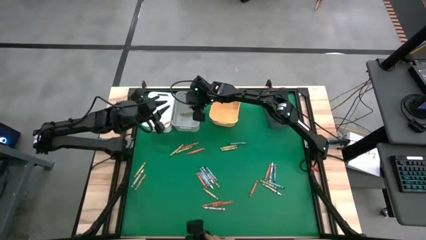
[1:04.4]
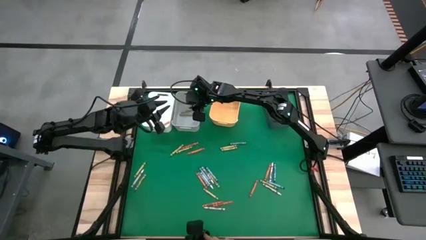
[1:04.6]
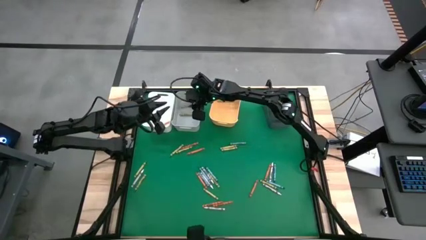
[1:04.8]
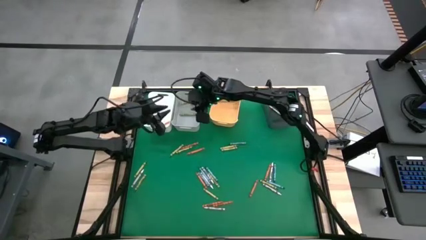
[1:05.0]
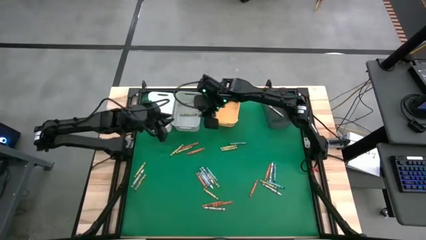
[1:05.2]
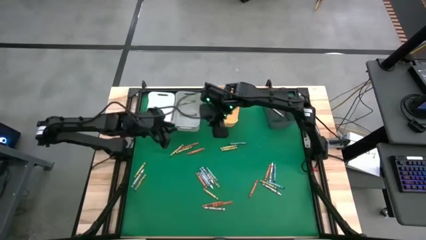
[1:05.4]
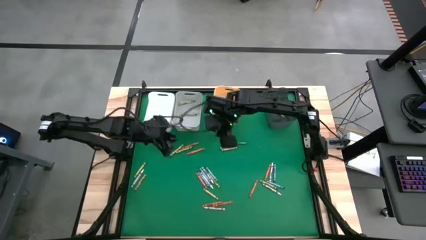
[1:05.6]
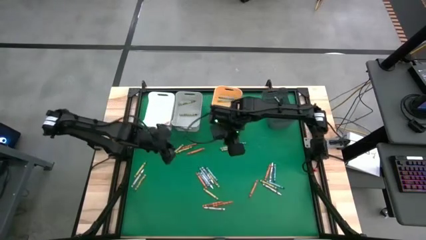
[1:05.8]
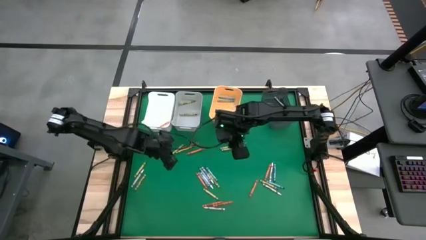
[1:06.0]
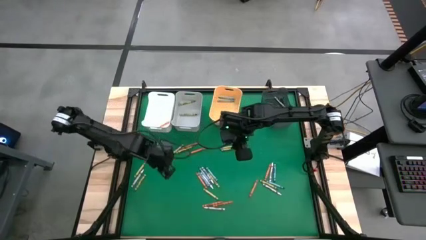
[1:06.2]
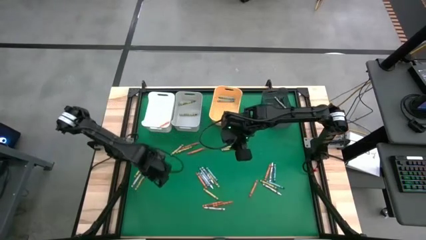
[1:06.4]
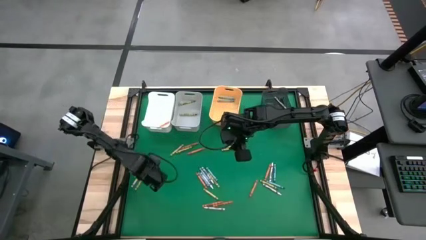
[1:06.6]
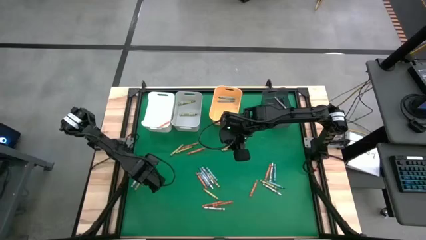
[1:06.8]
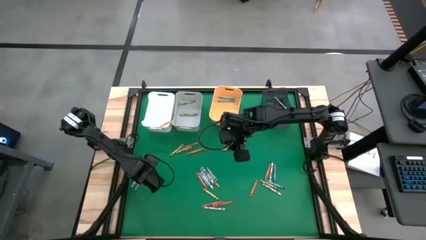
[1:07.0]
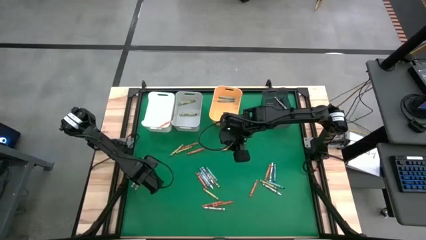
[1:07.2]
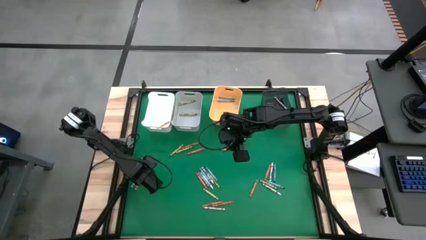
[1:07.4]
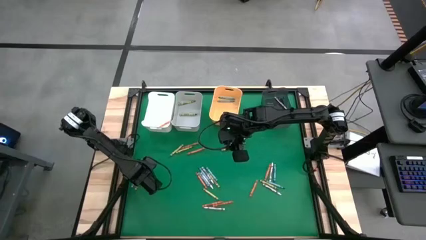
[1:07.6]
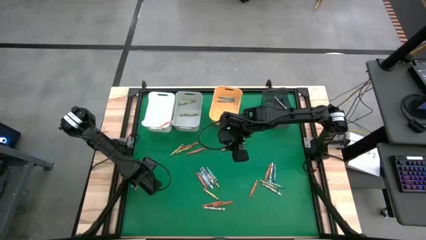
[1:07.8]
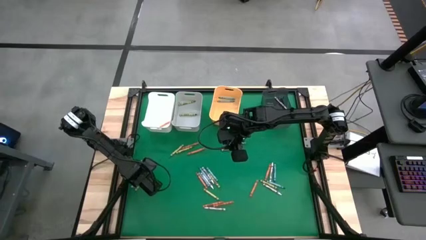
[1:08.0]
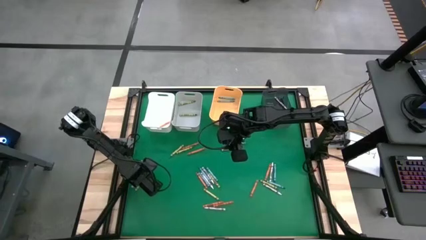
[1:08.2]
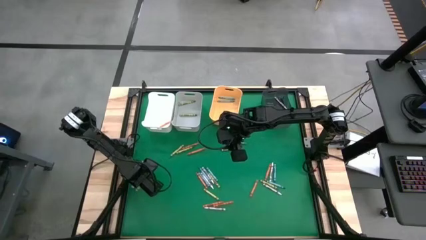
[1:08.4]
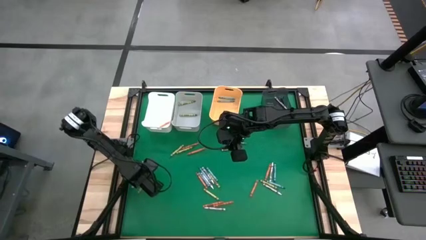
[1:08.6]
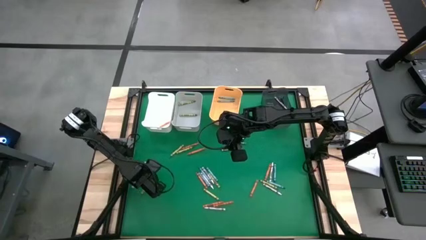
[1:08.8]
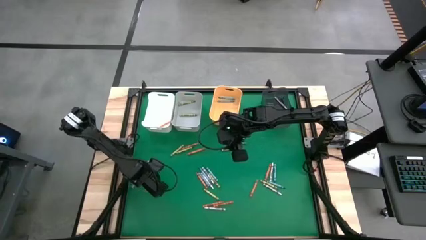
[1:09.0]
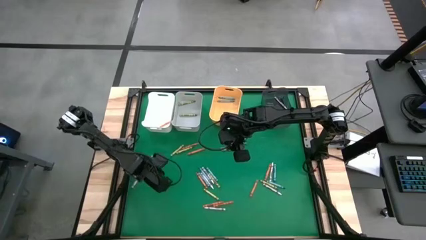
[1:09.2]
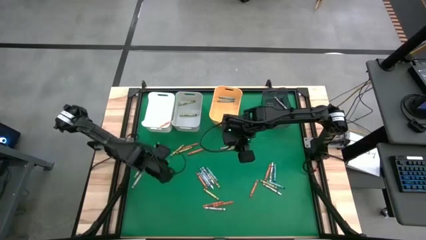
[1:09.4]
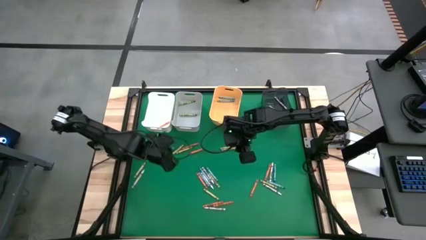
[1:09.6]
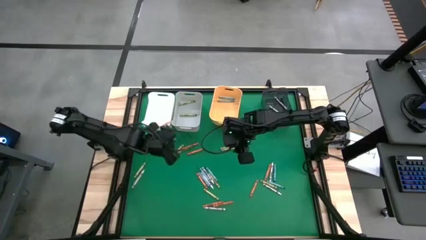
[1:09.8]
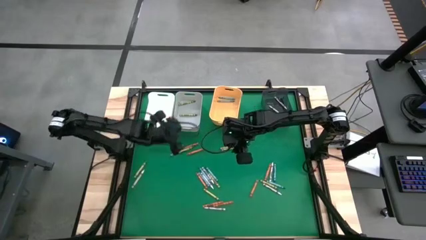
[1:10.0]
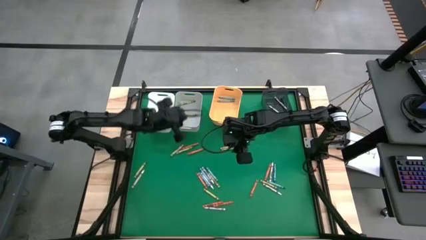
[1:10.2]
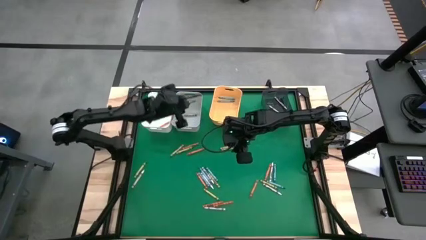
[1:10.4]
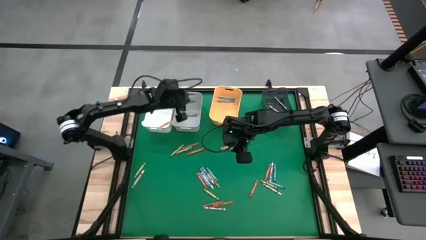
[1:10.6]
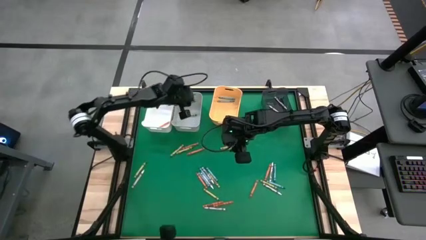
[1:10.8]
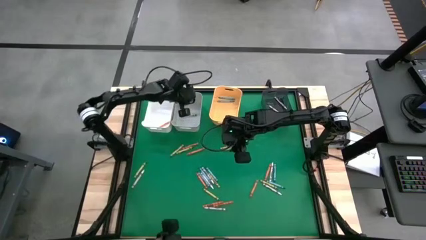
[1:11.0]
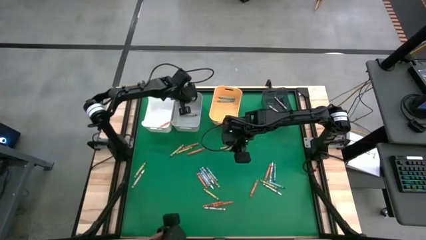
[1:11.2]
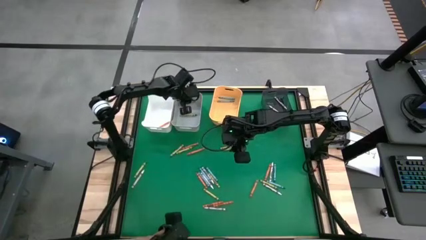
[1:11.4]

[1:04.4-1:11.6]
Task: Sort crayons
Put the green crayon into the gray bin

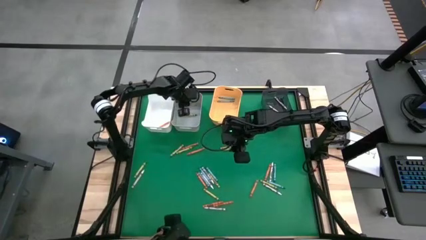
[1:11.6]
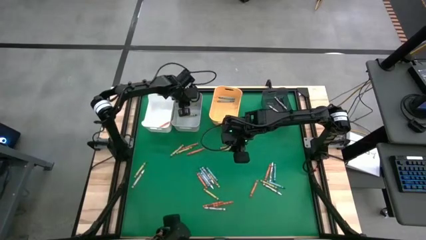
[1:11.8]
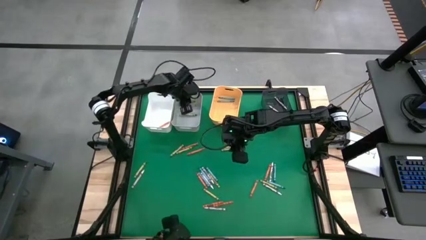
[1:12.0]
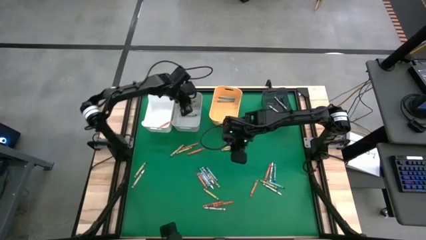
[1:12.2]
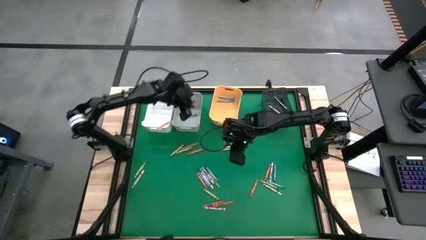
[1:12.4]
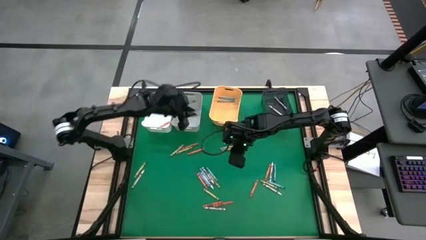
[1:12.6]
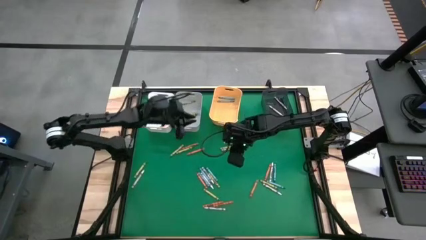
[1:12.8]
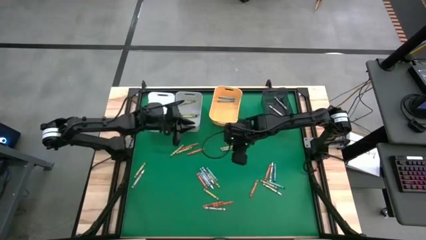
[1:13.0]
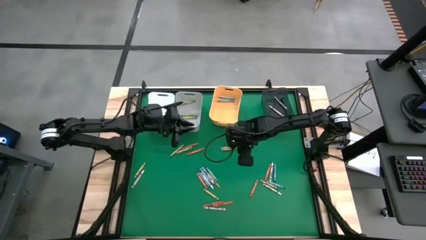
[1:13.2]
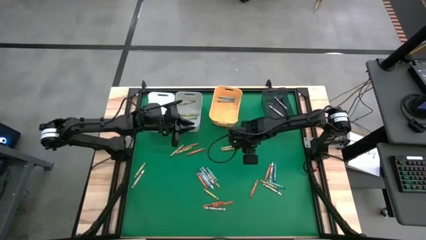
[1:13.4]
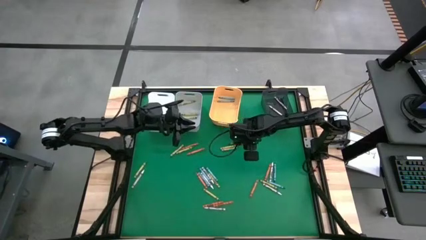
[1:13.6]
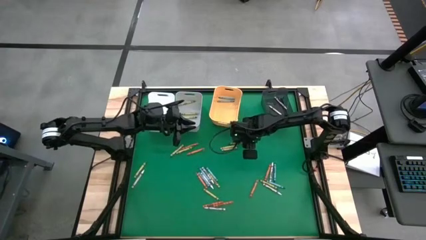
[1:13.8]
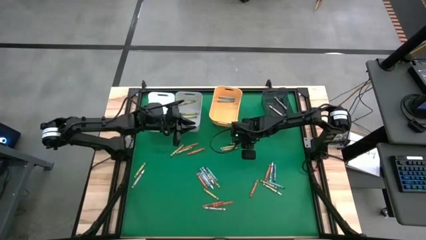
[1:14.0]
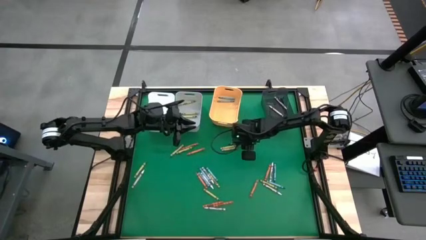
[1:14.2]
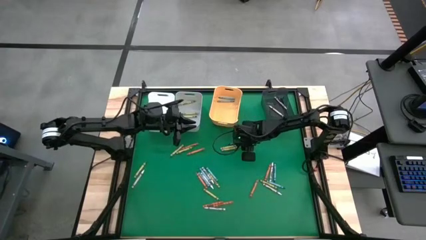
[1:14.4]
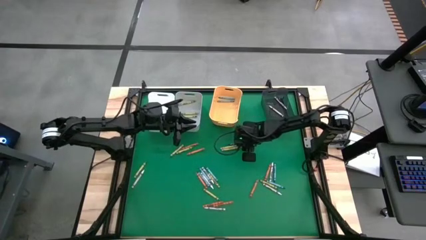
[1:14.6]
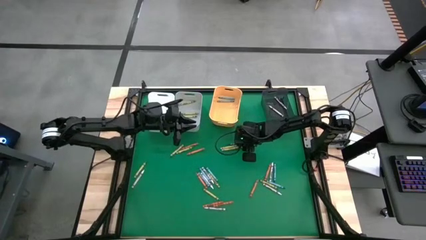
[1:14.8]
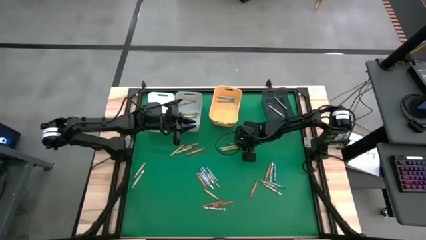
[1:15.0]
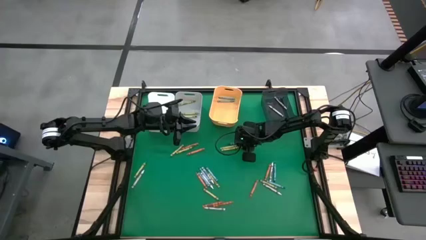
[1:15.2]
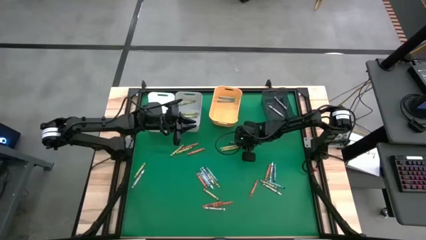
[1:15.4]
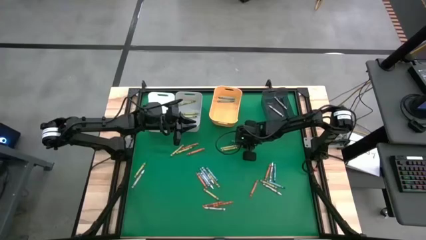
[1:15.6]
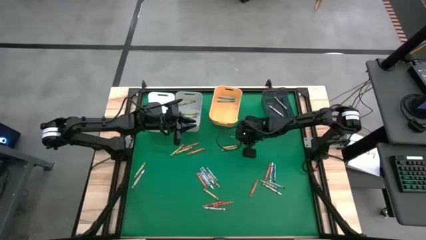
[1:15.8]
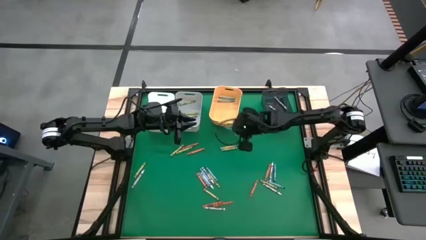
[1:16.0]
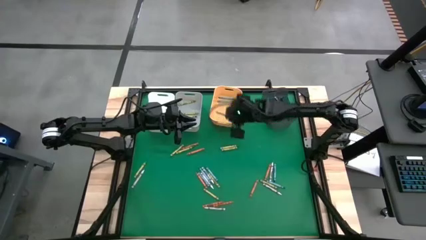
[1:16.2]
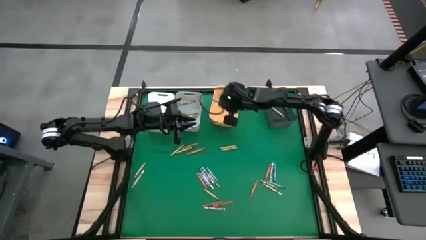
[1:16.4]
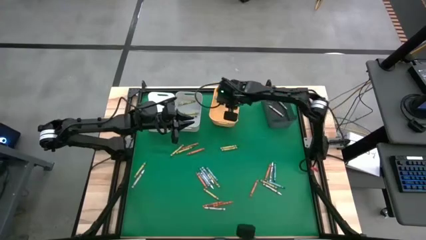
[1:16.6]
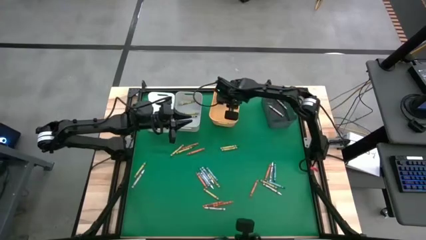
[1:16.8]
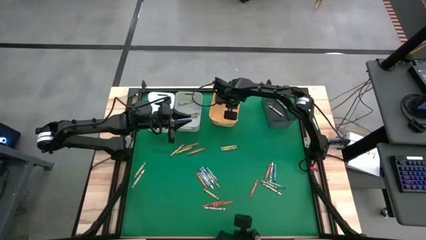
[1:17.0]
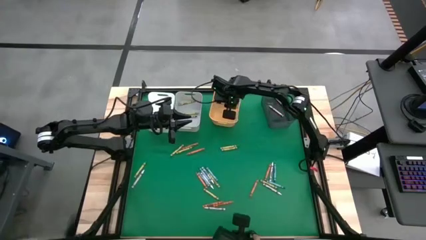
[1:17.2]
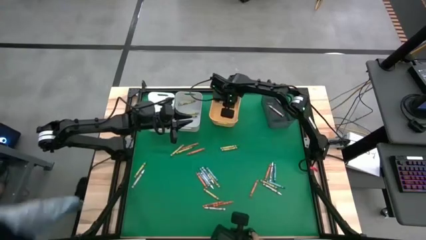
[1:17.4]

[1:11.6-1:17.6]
Put the blue crayon into the yellow bin

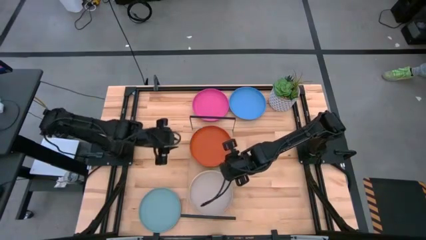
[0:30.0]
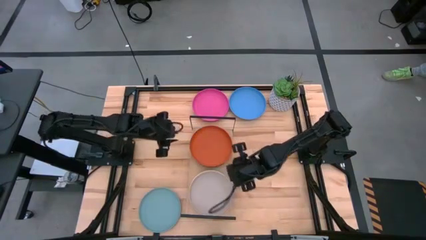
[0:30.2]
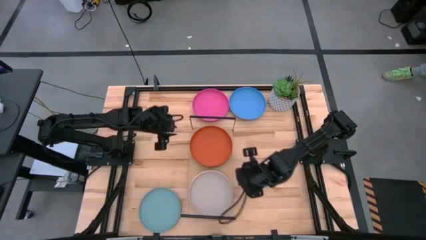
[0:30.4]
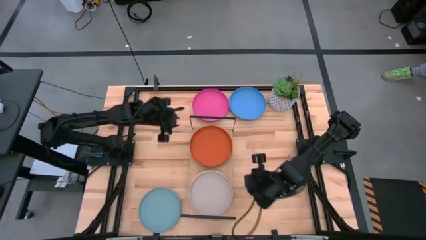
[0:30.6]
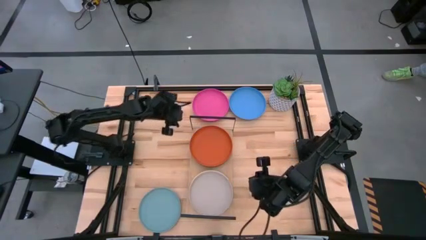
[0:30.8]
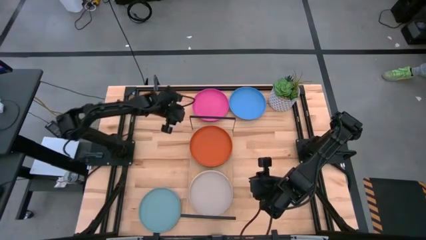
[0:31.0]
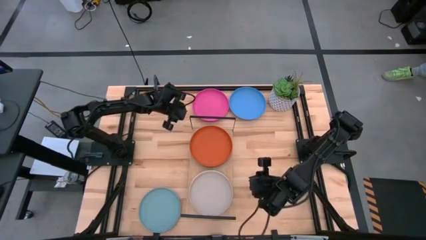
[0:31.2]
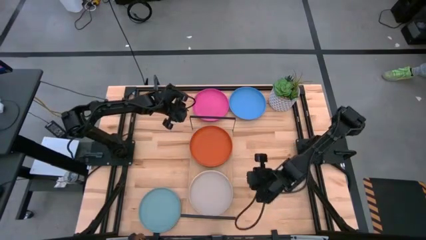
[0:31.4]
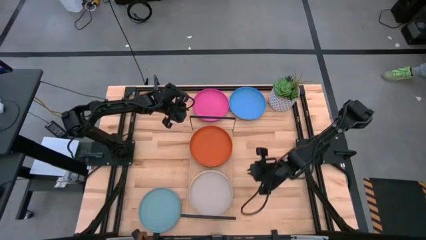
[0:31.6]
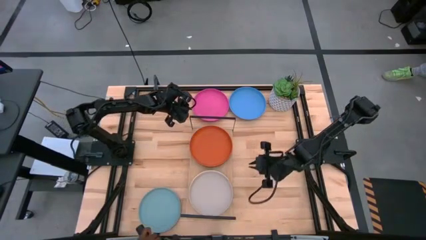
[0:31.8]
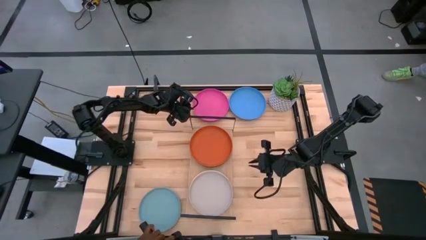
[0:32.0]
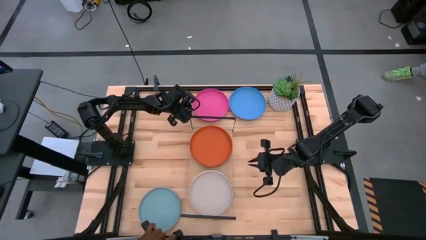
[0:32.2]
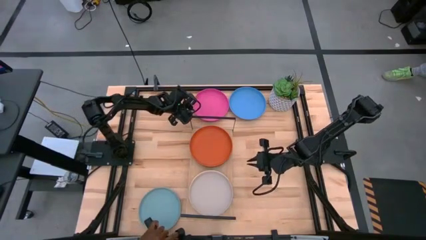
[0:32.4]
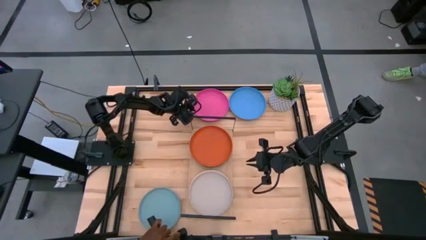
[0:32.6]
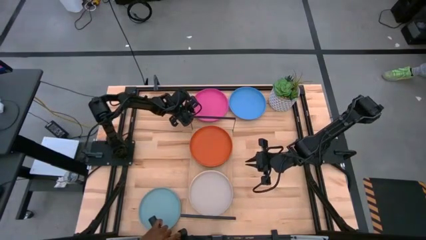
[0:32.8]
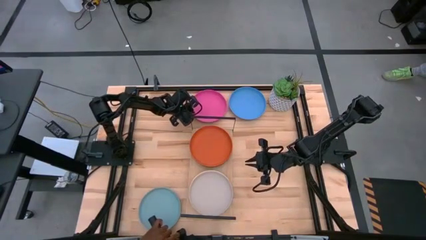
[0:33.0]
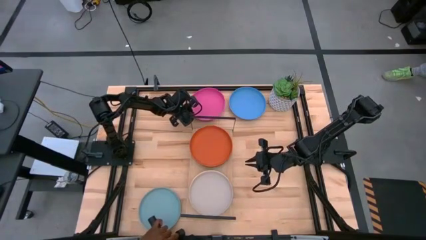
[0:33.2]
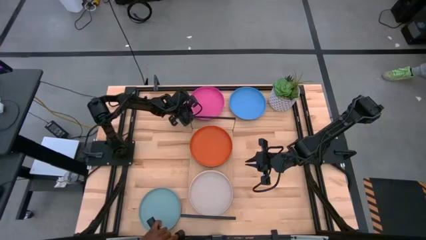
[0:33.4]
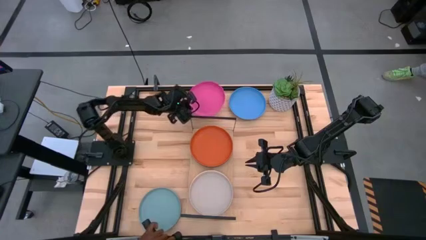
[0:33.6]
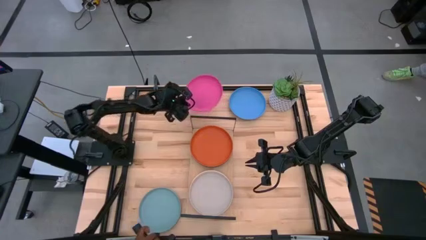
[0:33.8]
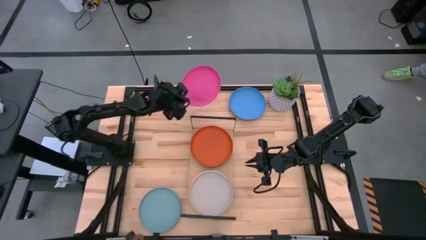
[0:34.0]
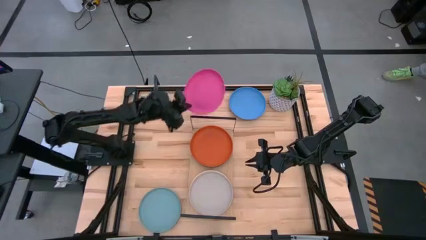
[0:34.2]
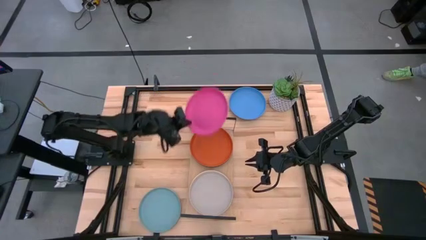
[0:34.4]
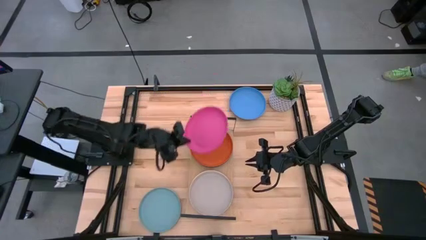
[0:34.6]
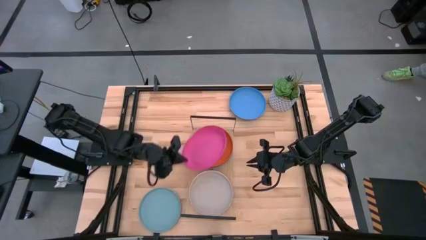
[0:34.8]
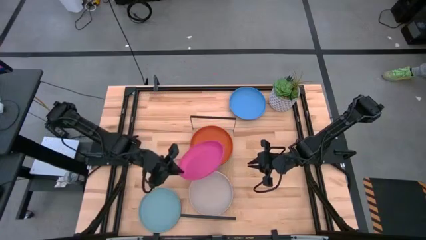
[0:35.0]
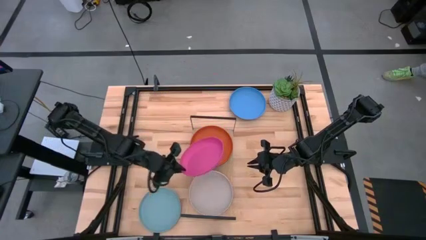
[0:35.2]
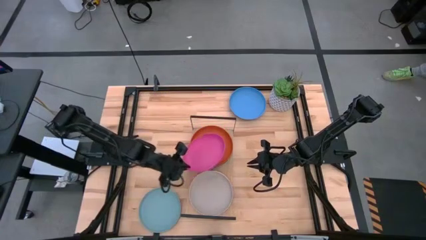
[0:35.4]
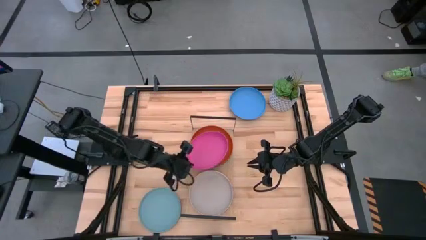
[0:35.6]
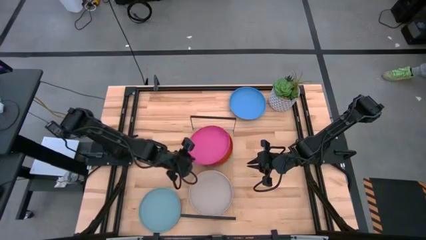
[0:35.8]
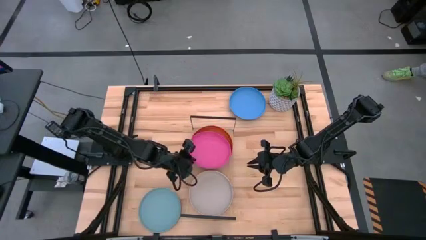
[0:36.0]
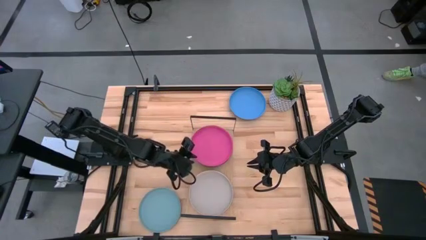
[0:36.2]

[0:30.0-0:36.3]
Task: Place and stack plates onto a shelf
Stack the pink plate on top of the orange plate on the shelf
